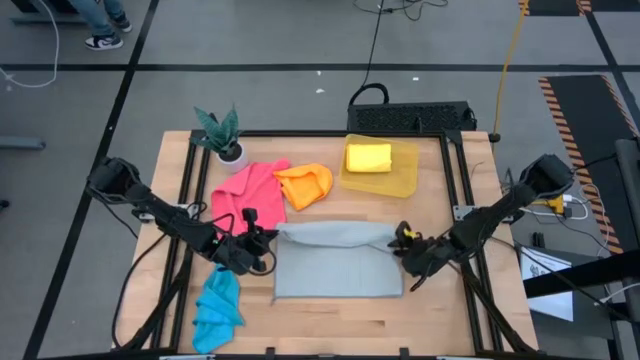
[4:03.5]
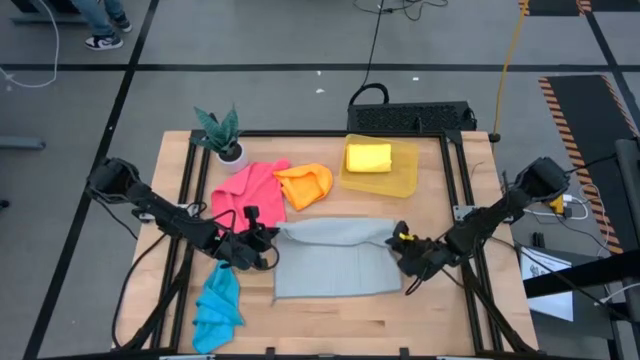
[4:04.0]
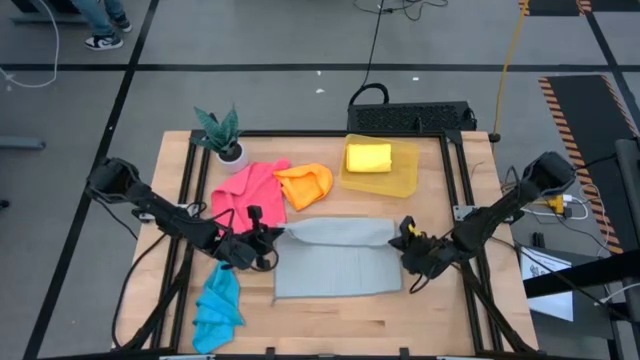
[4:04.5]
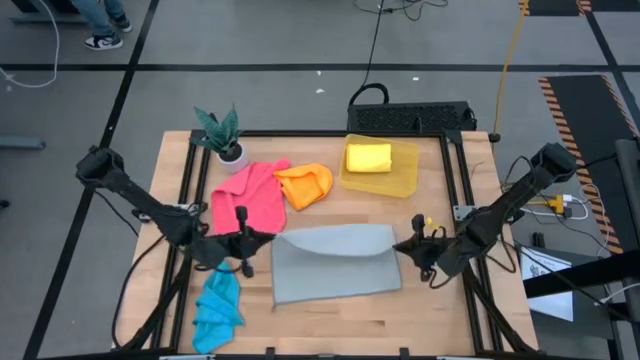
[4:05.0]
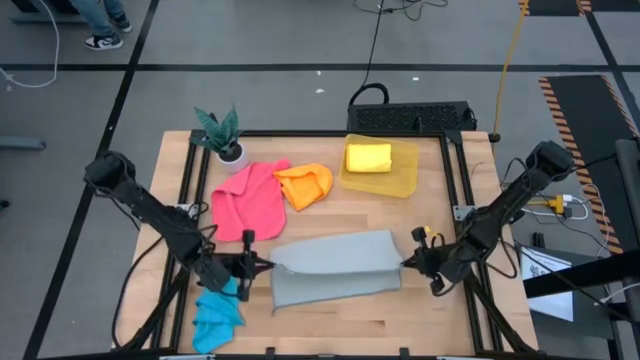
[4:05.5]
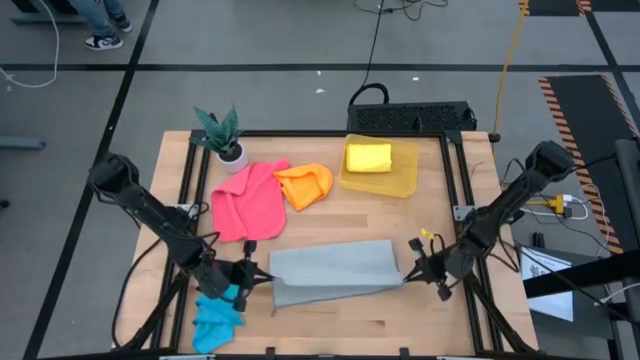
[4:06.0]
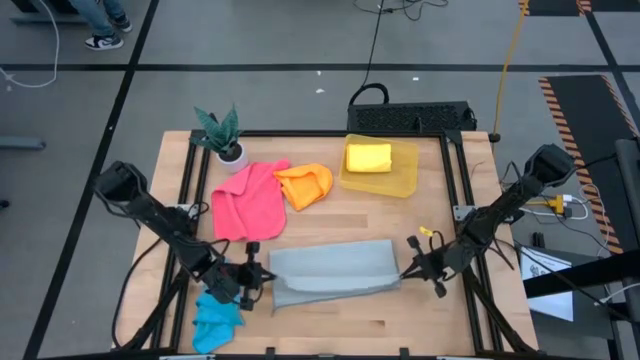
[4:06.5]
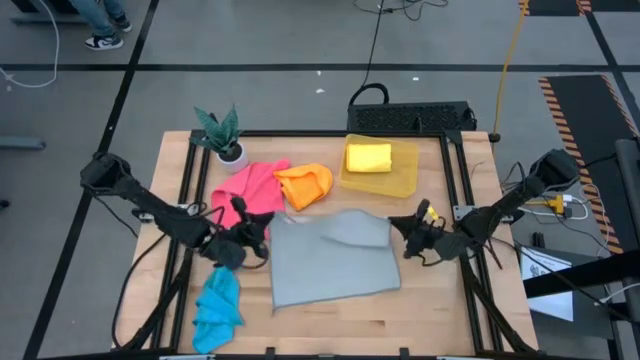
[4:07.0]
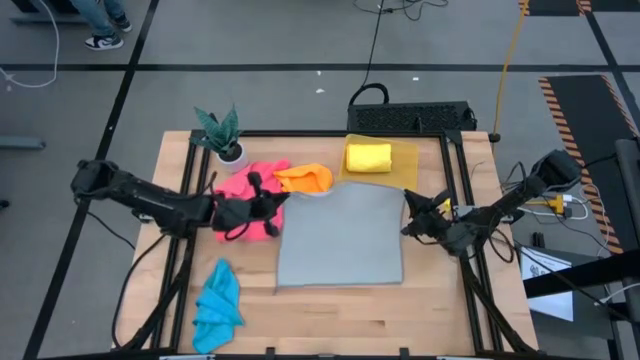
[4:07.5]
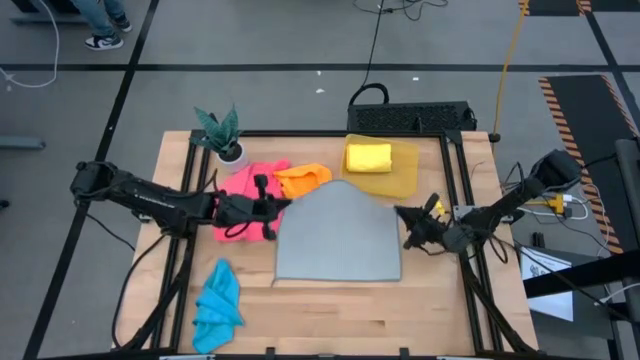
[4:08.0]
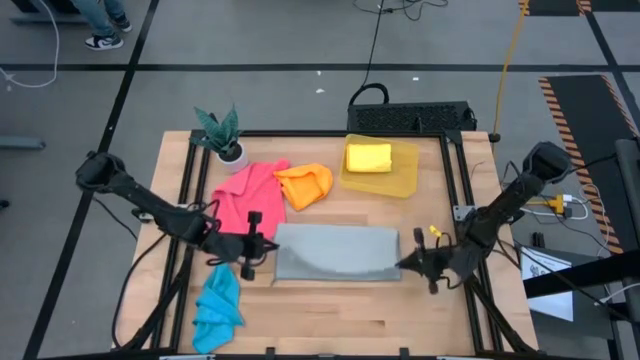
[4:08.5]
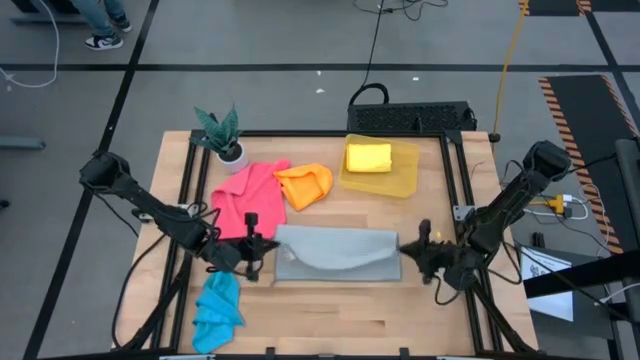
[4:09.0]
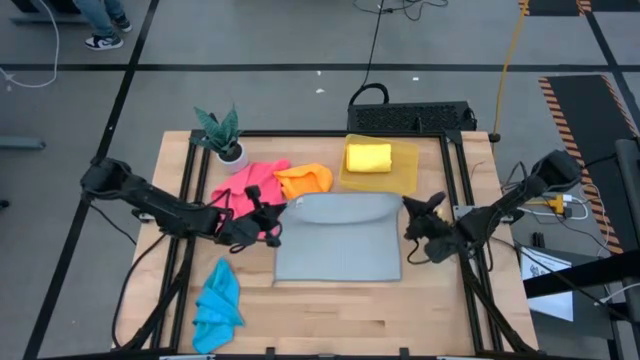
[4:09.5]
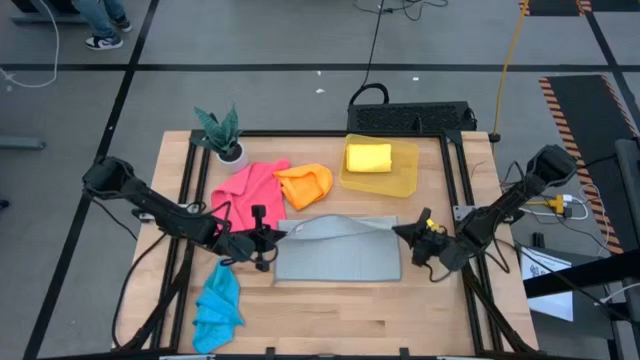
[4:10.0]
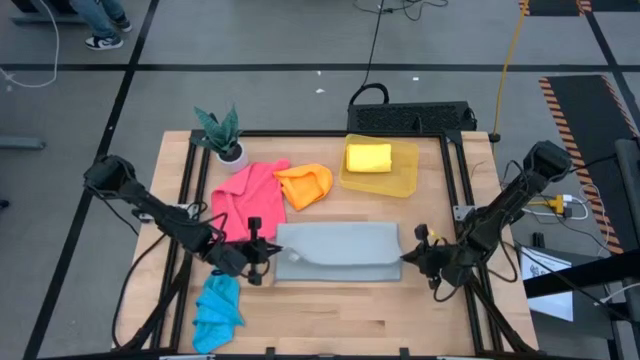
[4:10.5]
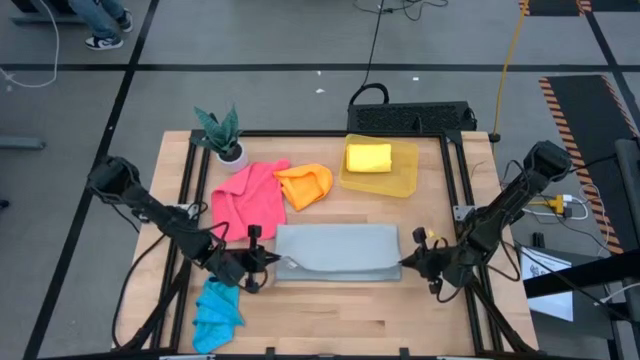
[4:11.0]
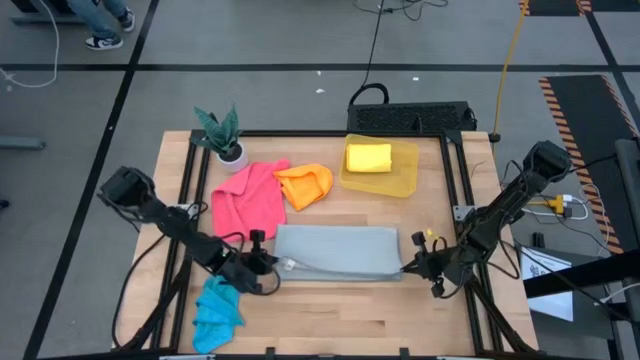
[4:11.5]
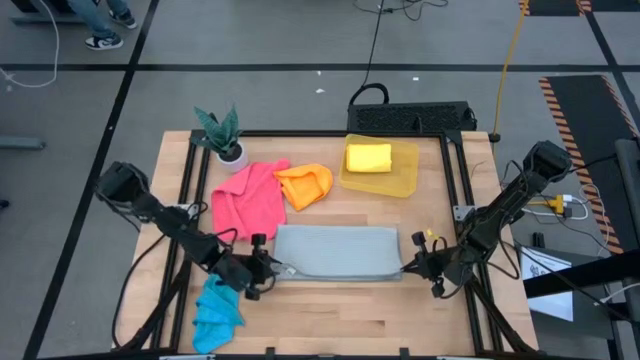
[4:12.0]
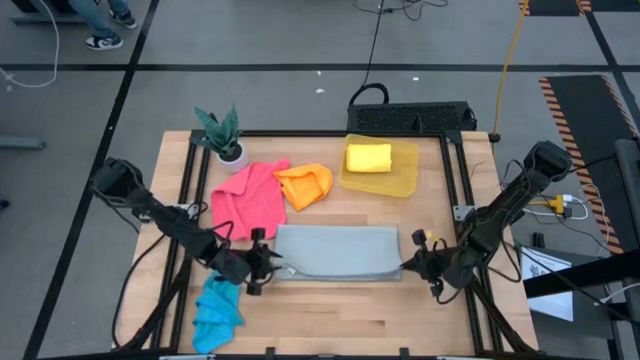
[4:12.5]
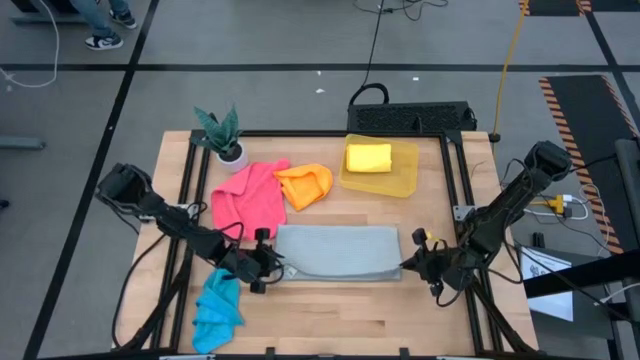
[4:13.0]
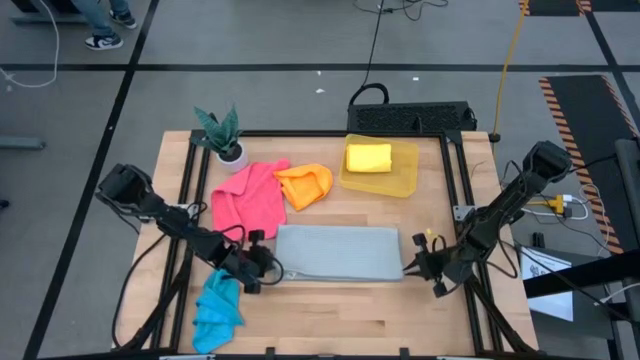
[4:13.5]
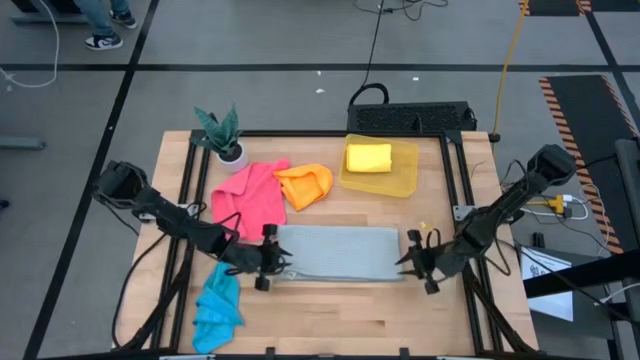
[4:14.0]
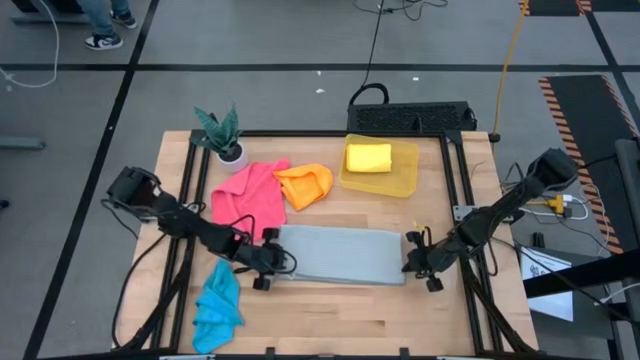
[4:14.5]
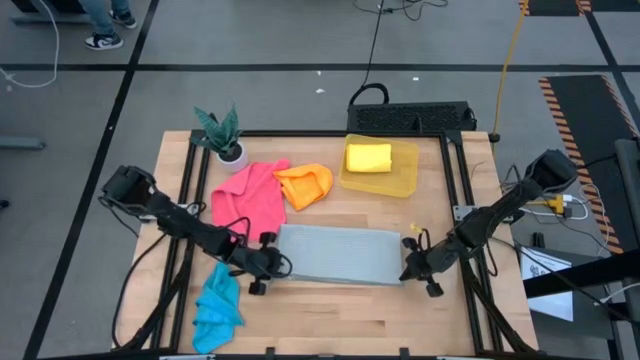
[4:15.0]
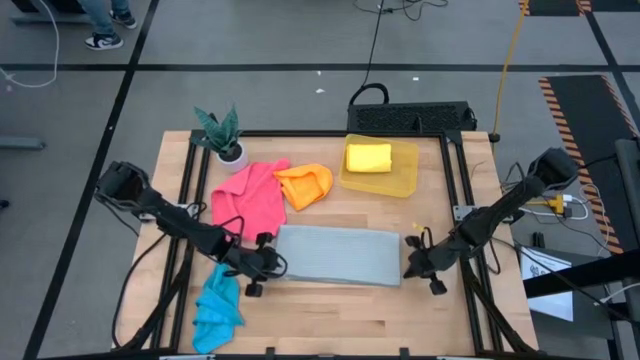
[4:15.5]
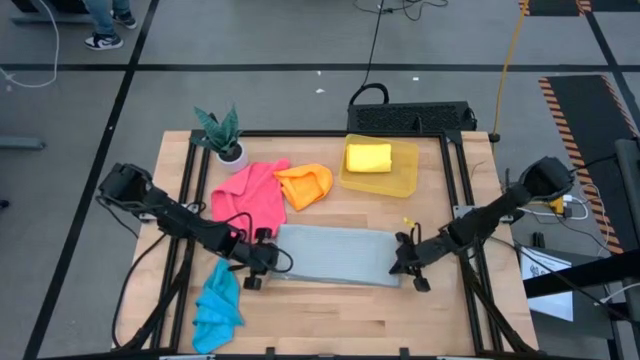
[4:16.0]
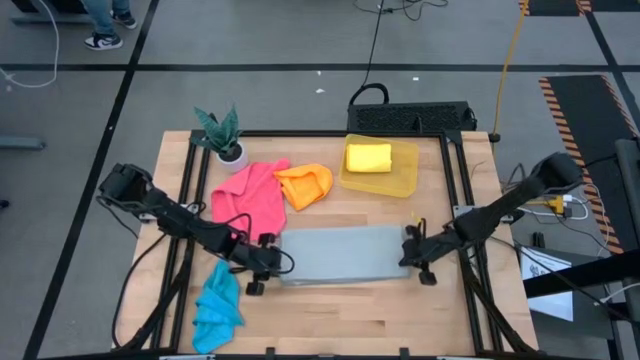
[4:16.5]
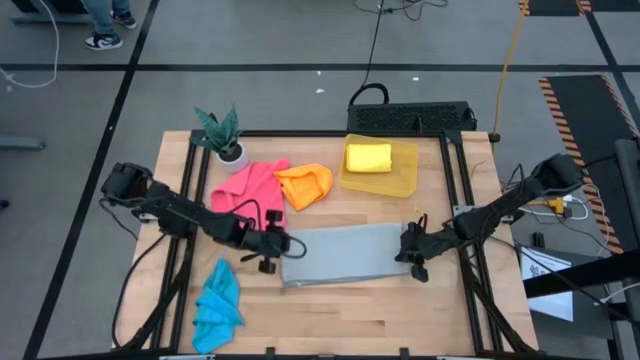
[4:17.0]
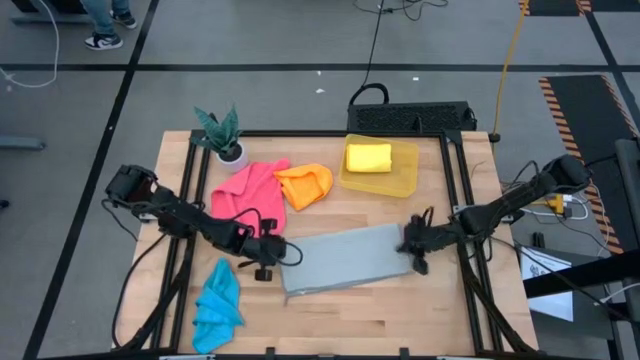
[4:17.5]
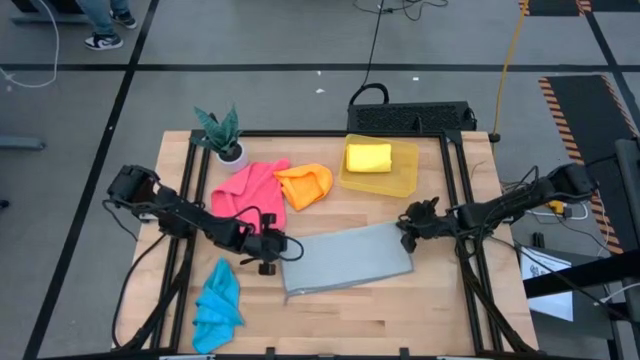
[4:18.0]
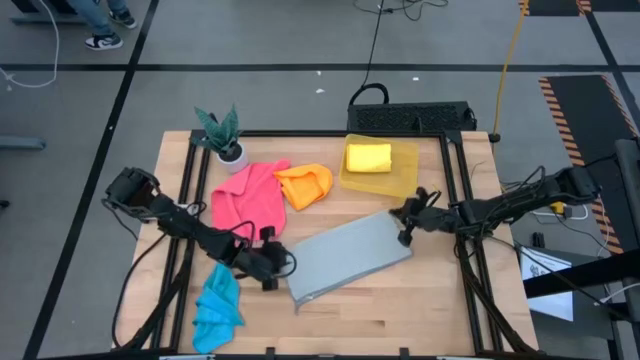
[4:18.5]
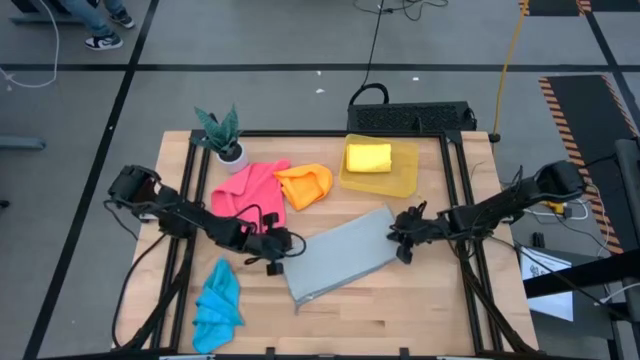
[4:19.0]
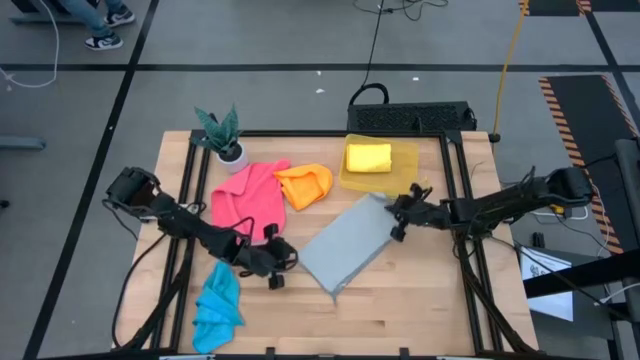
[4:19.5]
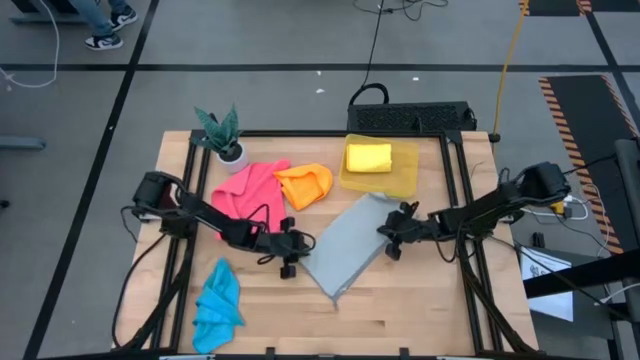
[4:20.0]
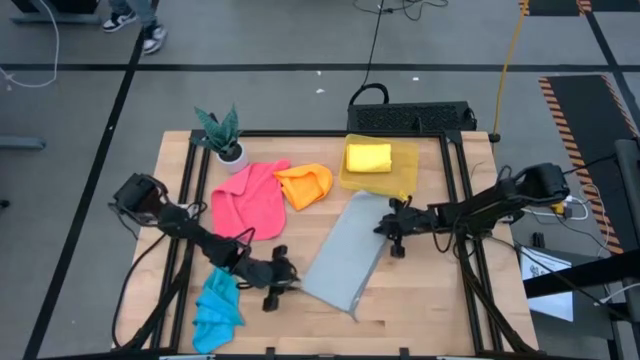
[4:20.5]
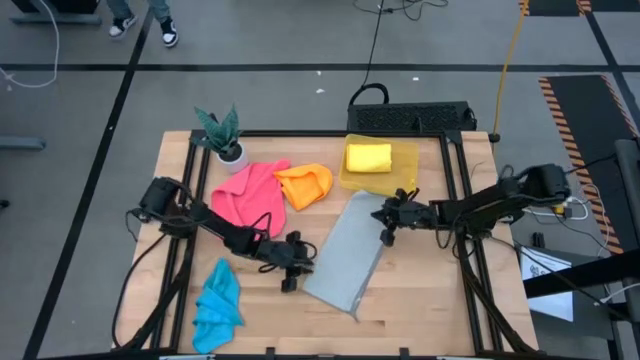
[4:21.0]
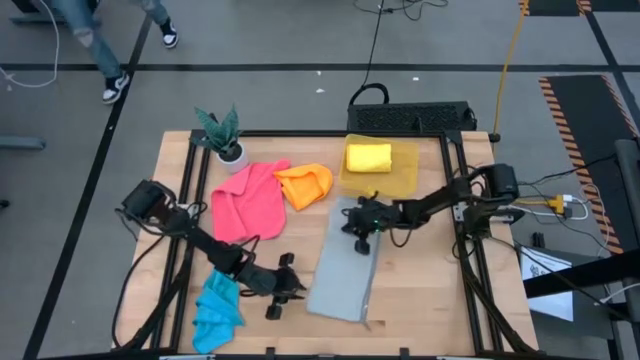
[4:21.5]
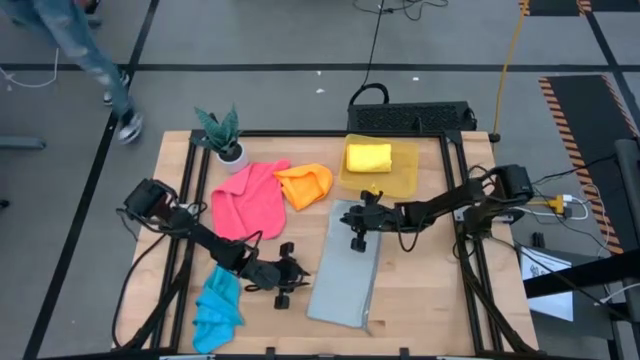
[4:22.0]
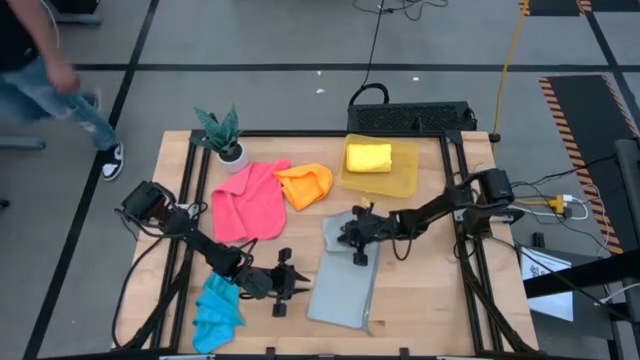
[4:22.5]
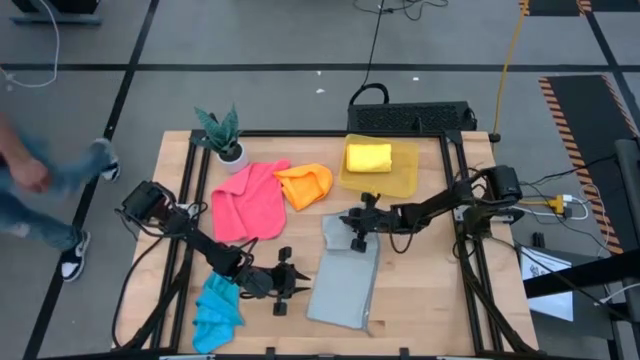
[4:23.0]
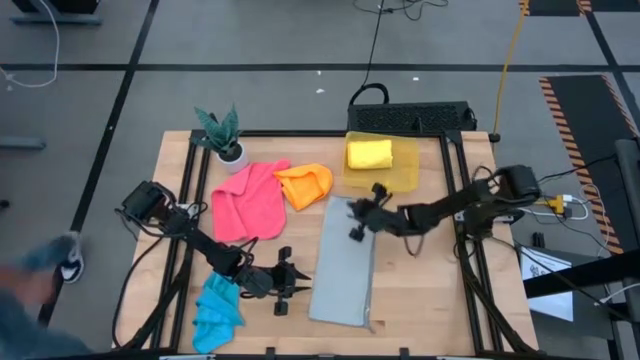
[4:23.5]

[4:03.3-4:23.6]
Task: Fold microfiber towels
Fold the gray kitchen towel
